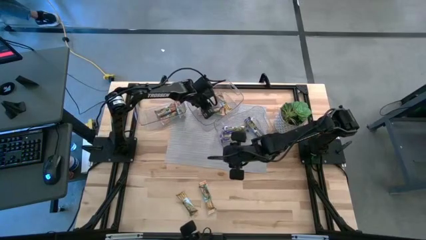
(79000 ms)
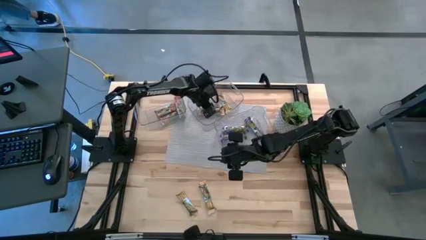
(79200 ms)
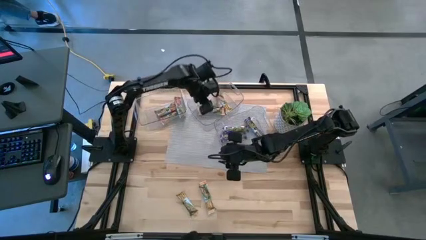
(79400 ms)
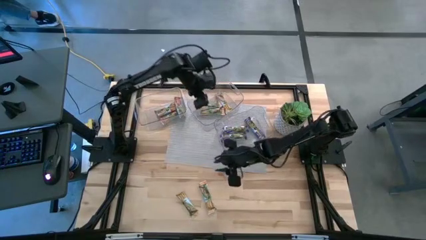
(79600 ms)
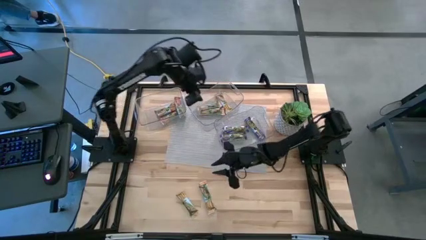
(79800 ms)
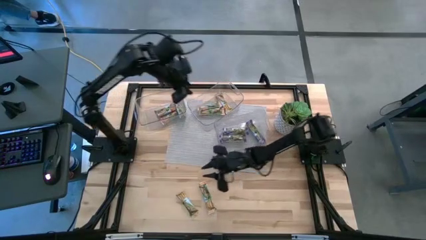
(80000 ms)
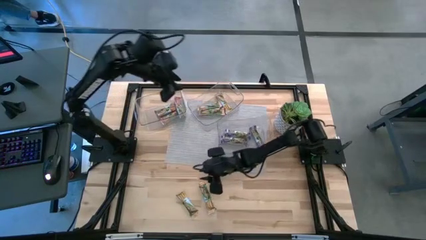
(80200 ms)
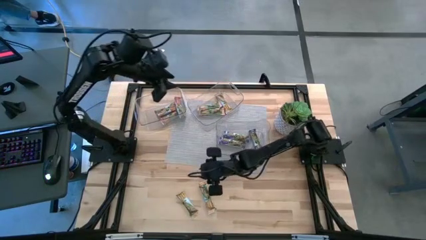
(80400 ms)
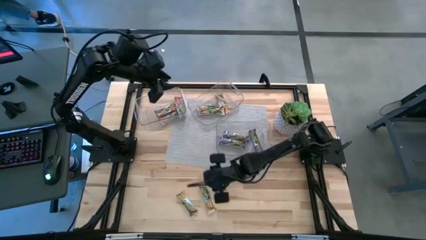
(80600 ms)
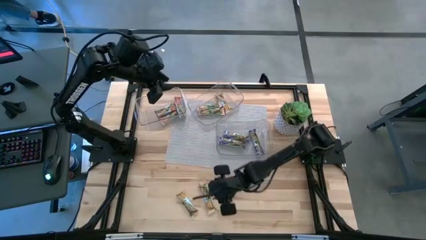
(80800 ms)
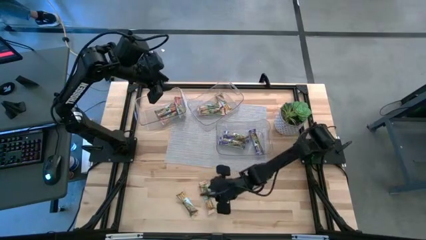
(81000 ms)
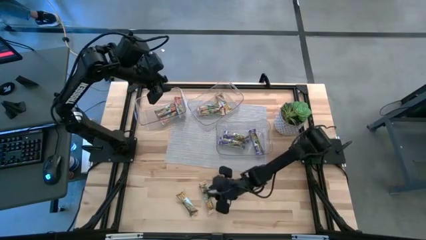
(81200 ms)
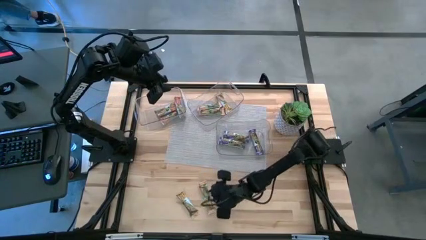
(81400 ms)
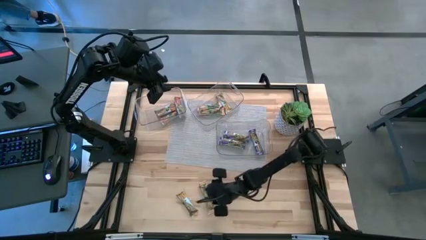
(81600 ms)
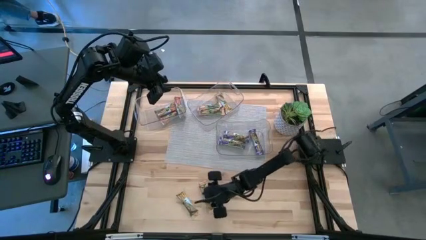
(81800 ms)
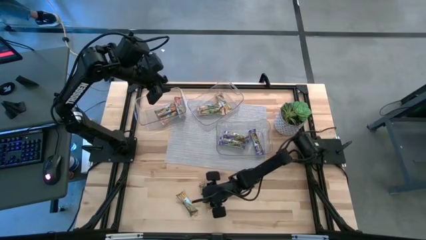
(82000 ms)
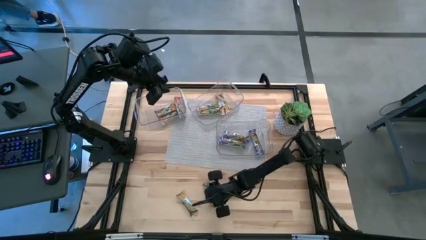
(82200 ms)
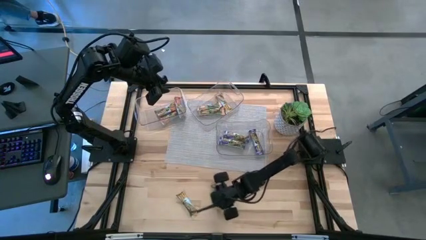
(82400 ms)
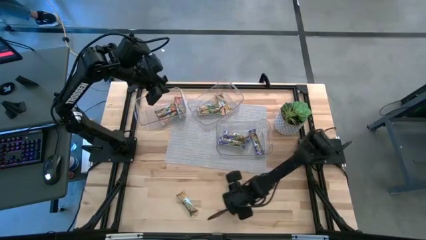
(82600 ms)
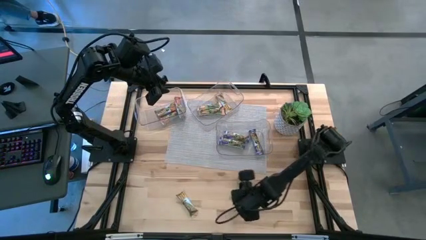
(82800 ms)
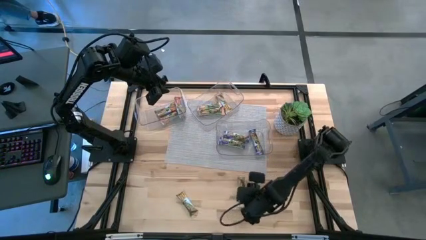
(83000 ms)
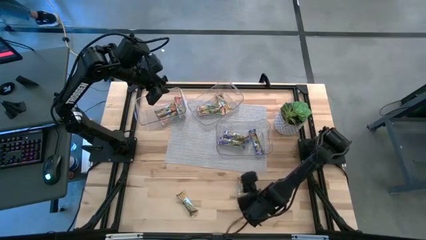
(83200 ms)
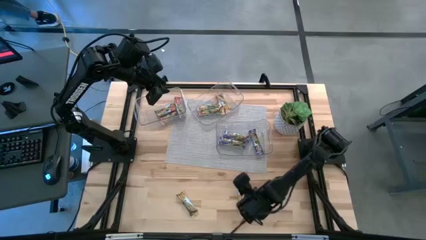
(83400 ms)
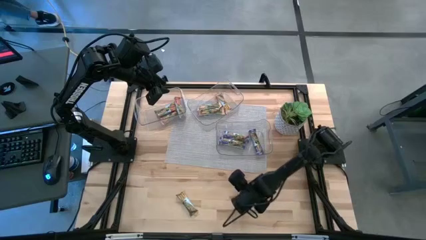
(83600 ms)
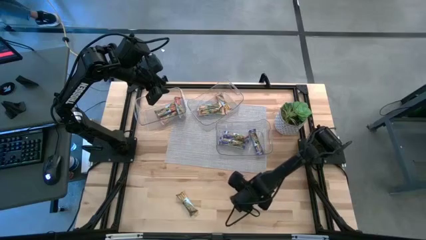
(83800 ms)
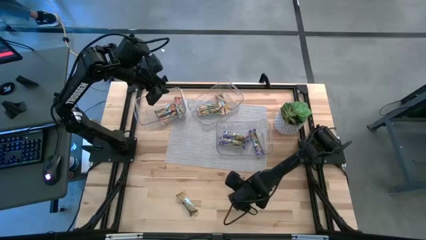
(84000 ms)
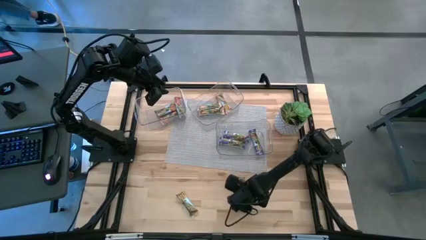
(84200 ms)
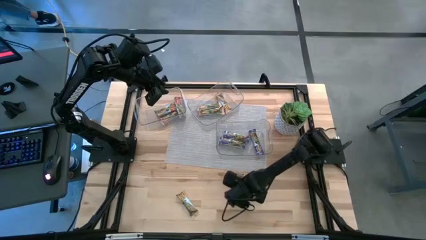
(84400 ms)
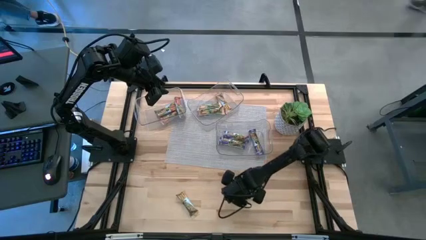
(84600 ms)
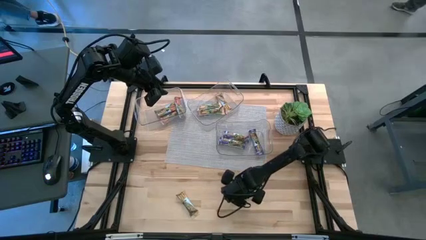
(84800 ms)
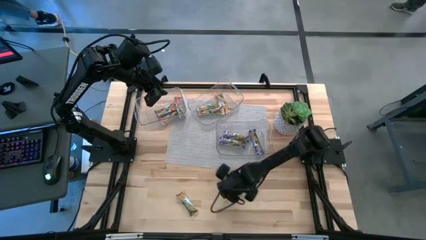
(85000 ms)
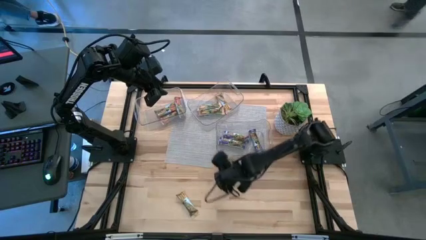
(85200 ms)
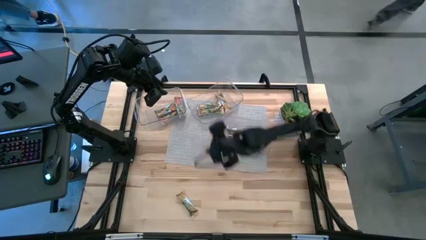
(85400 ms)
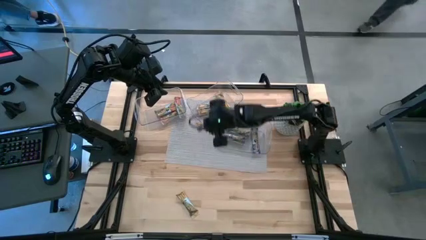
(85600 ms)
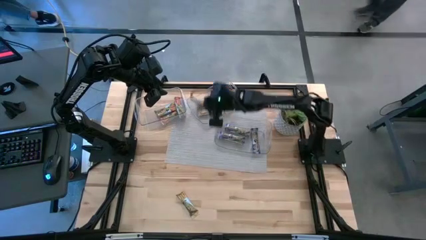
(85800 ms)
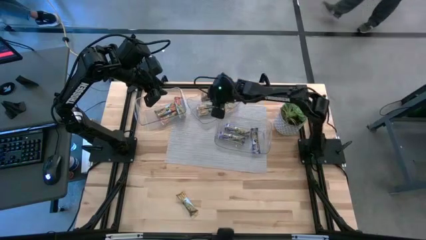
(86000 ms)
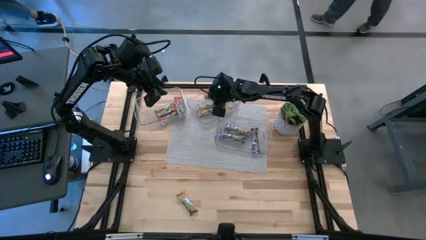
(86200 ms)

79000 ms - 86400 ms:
Task: Pick and place Granola Bars by type
Put the orange granola bar into the middle transparent bin

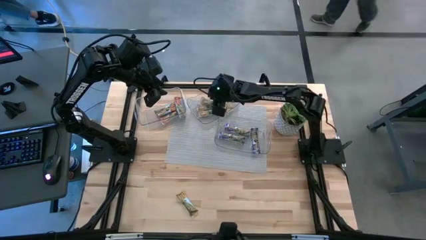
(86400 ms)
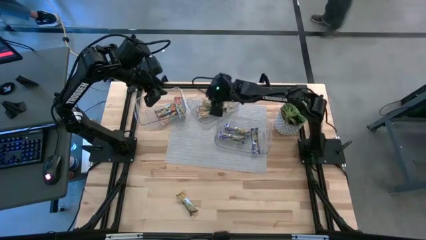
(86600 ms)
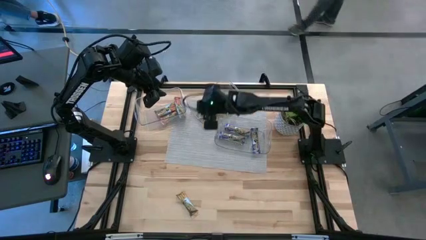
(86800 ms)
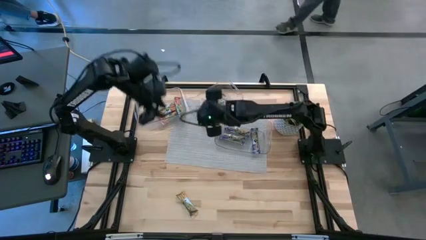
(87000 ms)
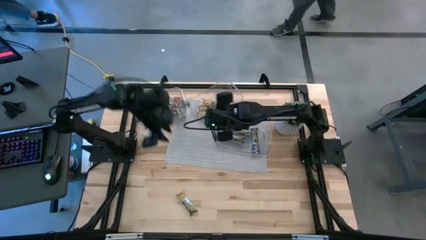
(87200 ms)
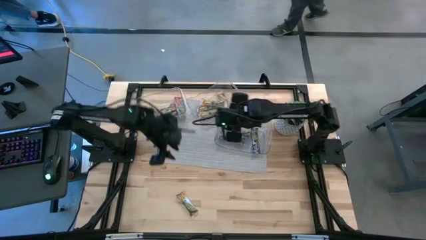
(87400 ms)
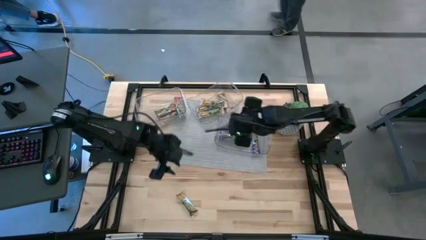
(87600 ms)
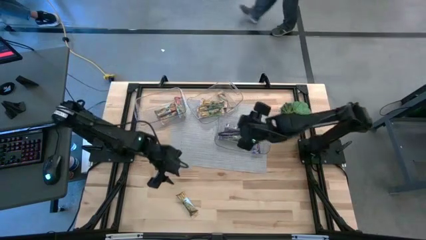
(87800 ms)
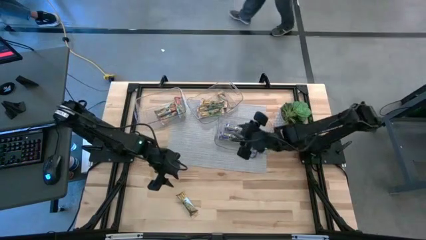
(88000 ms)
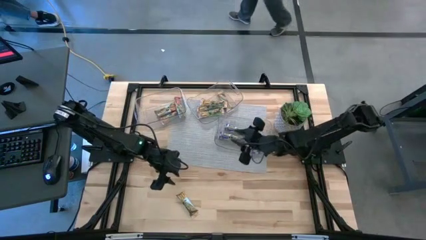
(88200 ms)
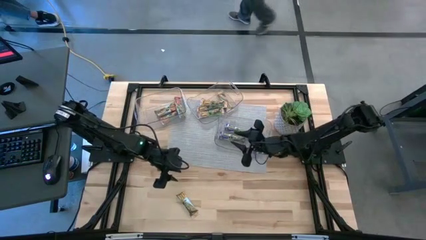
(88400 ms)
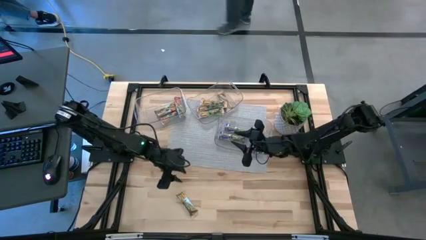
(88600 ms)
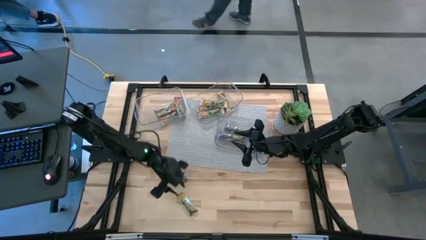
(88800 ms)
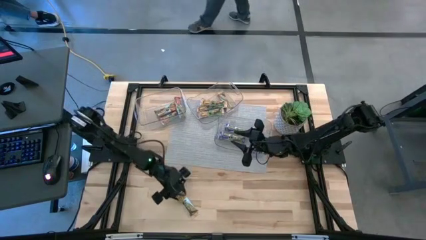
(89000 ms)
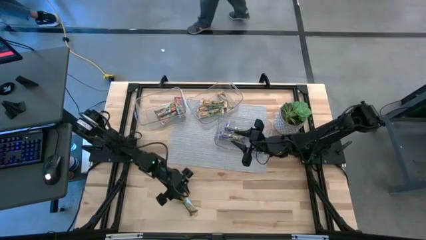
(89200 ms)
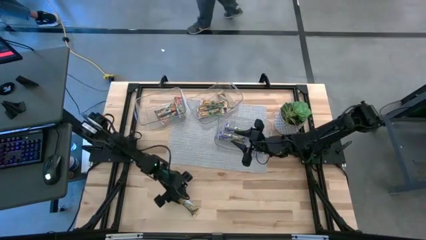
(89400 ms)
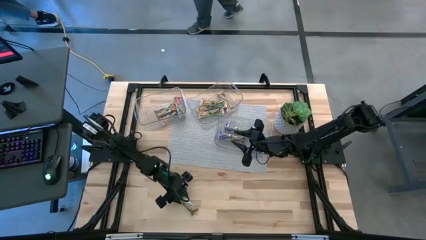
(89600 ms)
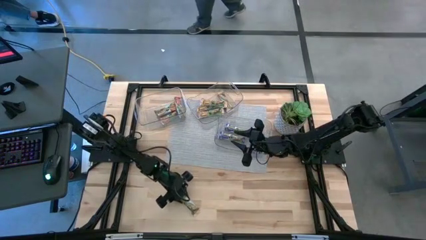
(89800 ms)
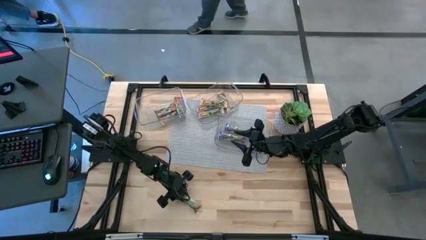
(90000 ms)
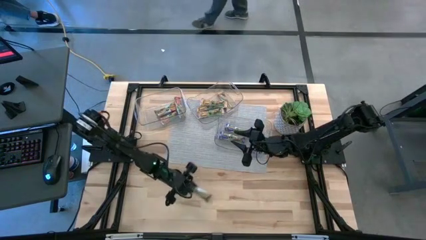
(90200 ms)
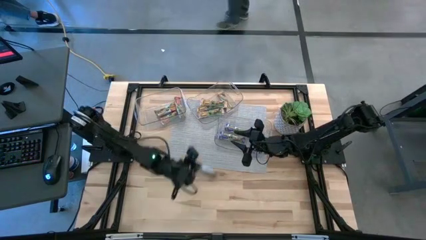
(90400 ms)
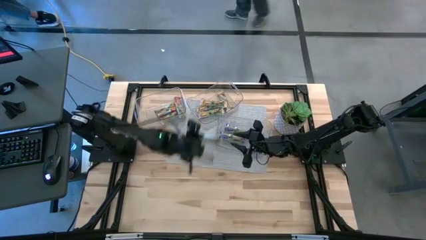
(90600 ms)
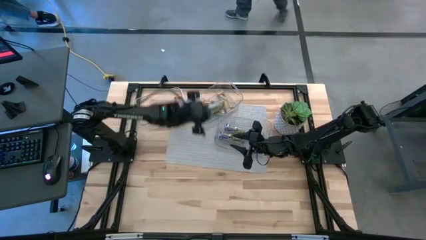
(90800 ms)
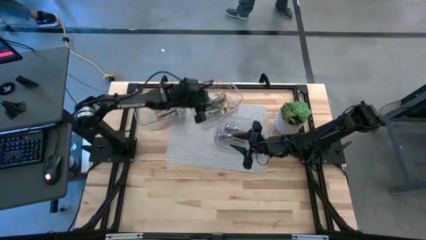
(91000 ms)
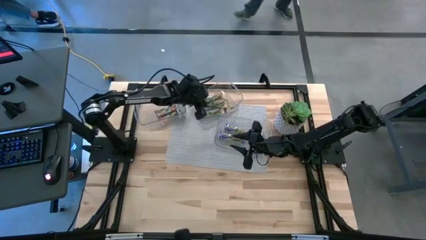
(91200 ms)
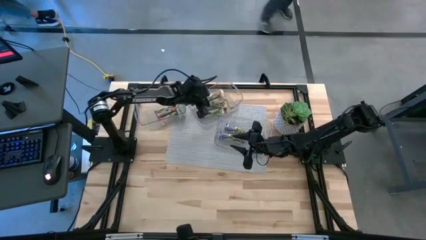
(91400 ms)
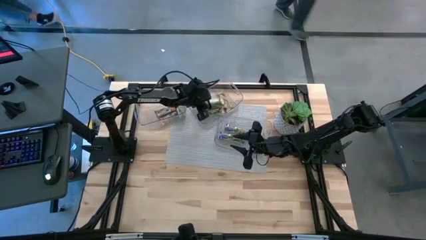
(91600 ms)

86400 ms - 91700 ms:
Put the orange granola bar into the middle transparent bin

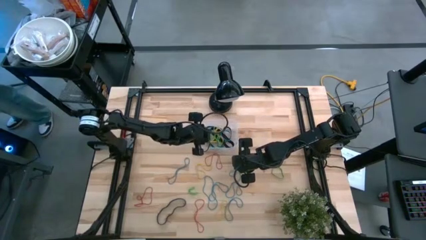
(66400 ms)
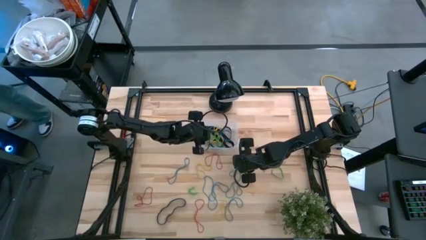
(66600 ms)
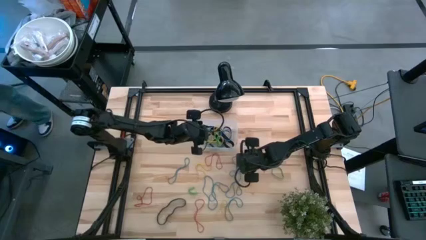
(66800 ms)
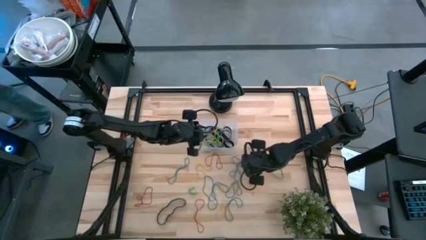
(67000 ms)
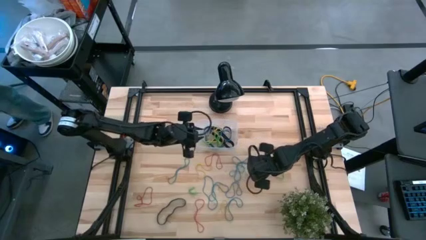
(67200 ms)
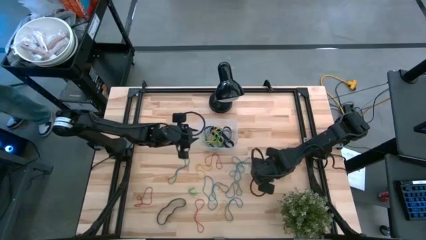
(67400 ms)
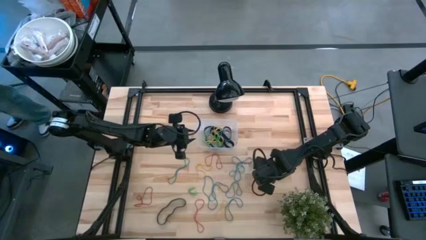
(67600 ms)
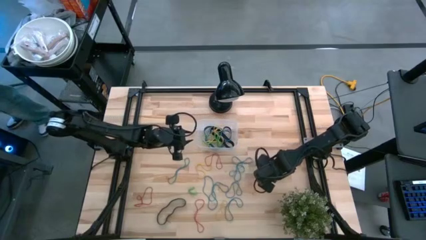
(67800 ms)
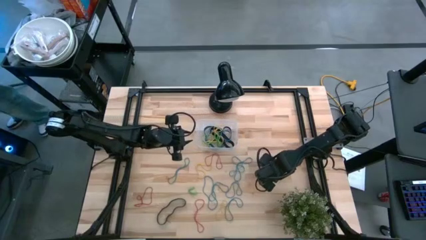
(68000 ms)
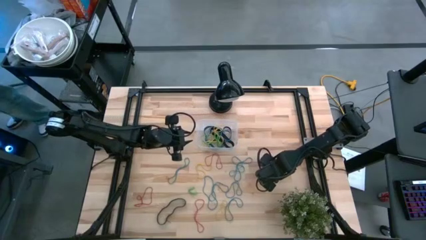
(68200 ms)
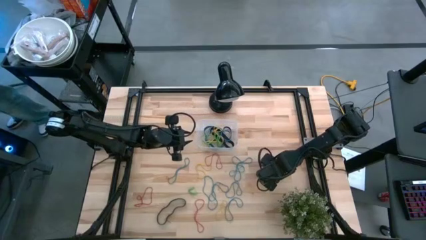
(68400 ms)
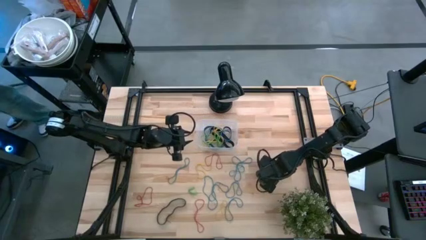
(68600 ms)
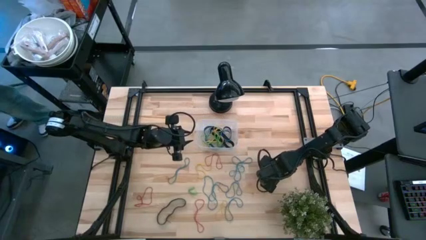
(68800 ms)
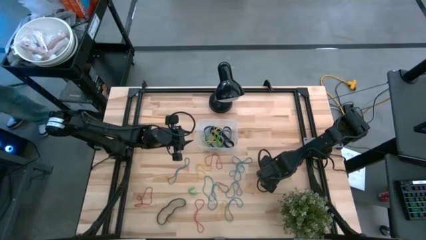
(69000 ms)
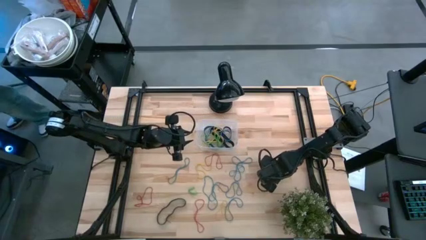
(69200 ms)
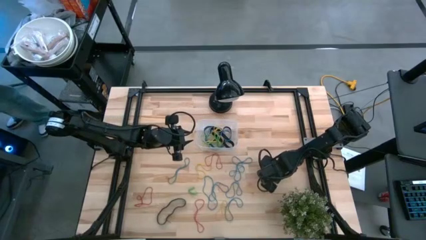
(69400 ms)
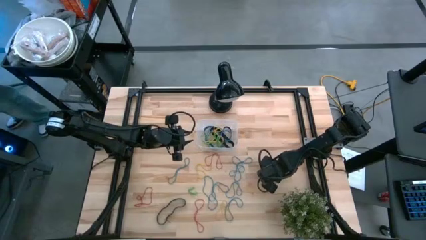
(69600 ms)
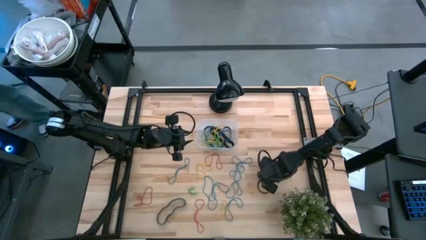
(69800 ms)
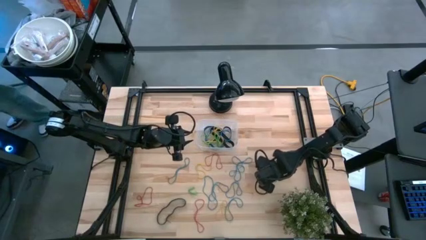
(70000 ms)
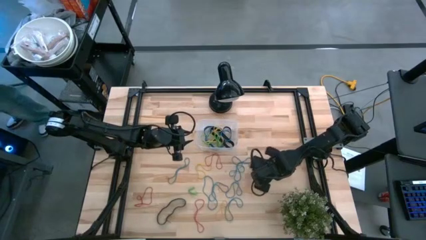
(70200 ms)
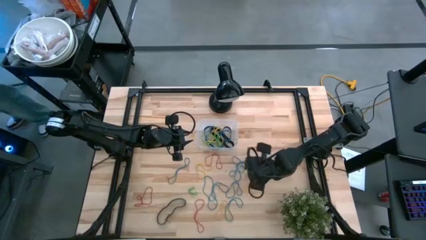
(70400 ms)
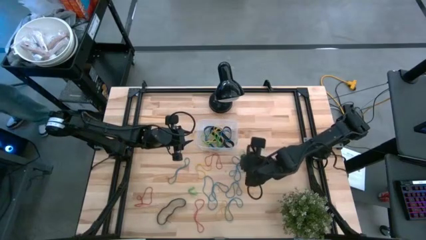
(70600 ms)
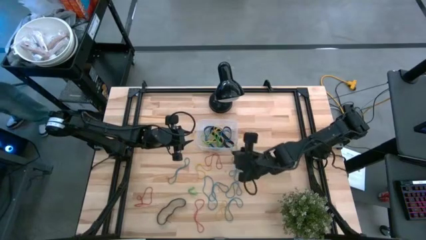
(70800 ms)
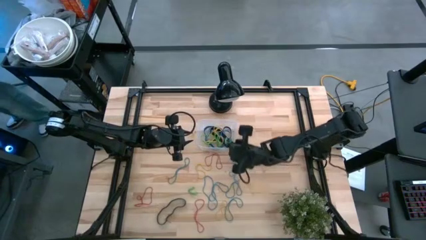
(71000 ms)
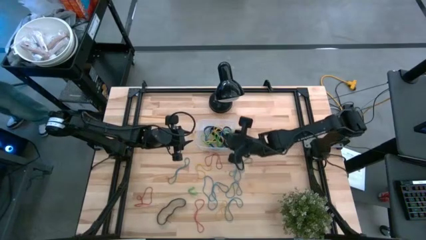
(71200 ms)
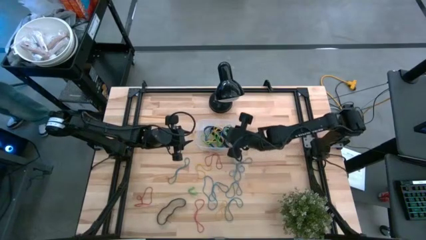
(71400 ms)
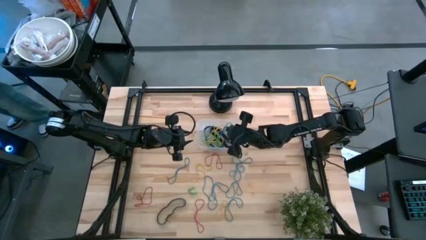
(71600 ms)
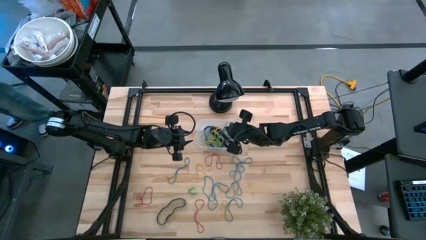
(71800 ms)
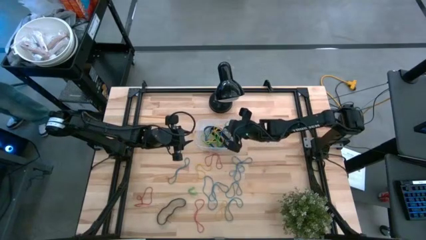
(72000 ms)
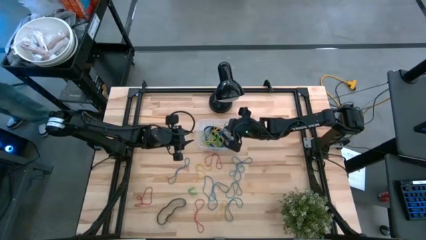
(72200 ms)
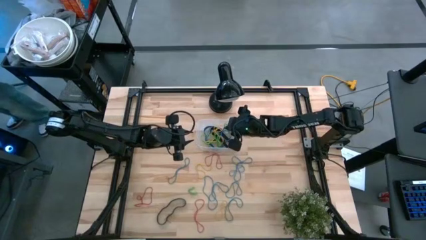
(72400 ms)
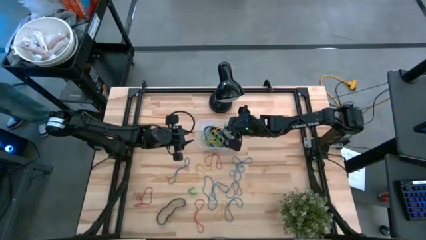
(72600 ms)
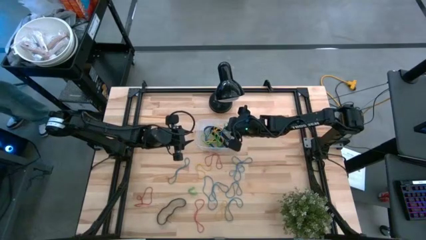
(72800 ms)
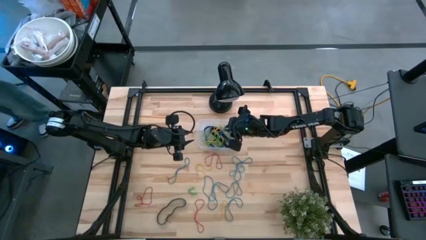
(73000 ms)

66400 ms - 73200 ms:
Task: Pick and place rubber bands into bin
Put the green rubber band into the transparent bin
